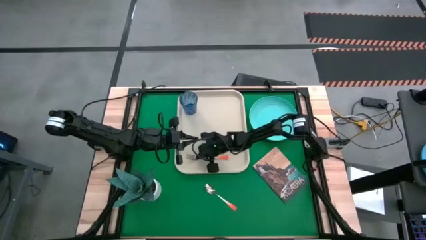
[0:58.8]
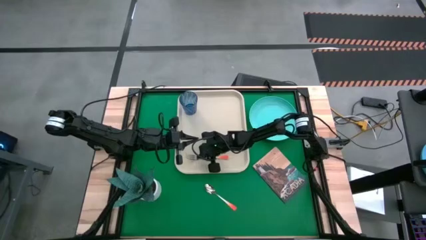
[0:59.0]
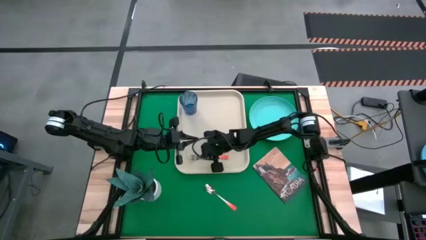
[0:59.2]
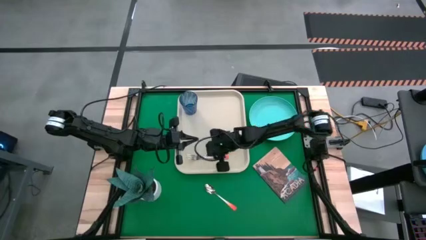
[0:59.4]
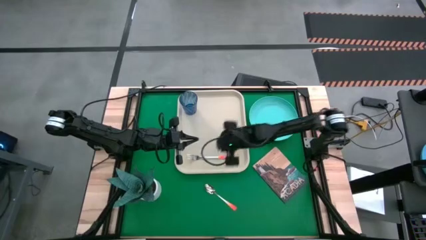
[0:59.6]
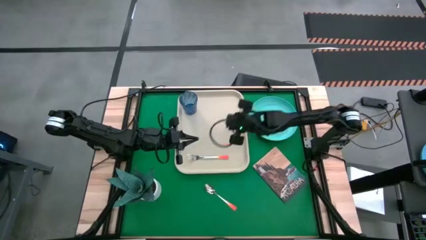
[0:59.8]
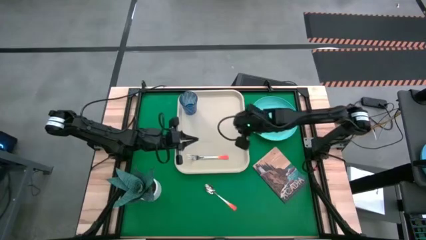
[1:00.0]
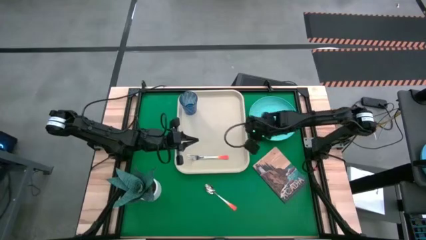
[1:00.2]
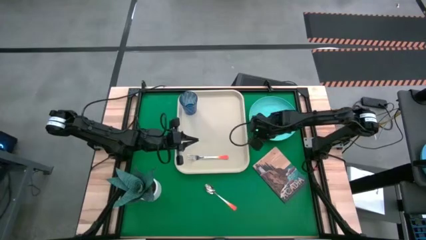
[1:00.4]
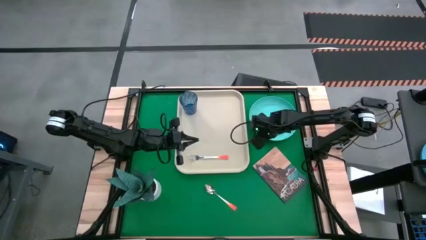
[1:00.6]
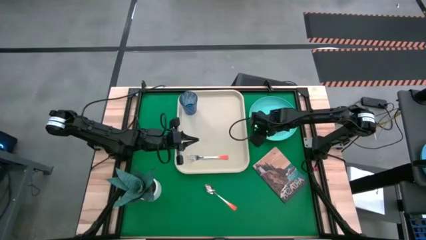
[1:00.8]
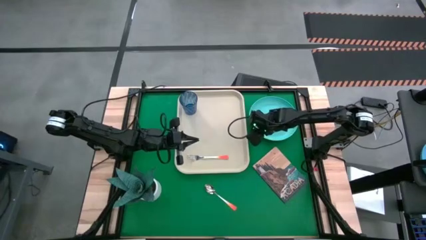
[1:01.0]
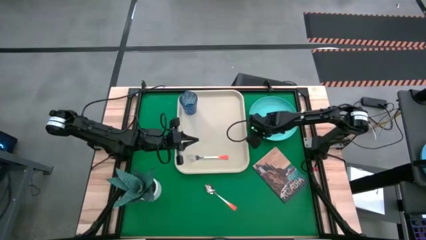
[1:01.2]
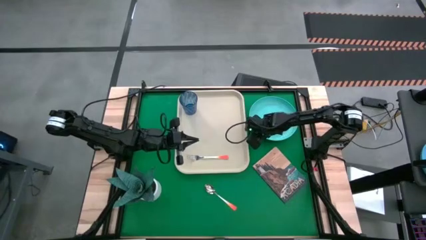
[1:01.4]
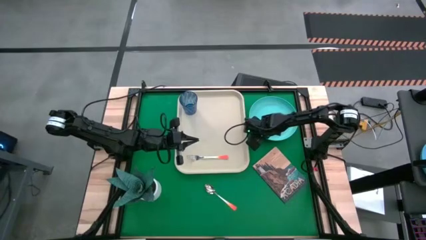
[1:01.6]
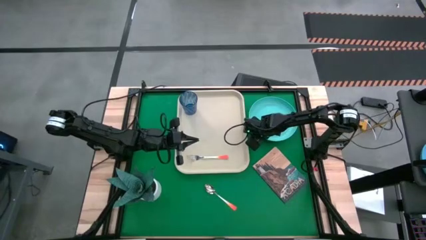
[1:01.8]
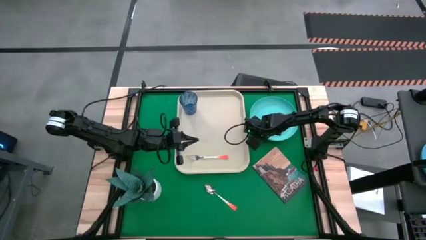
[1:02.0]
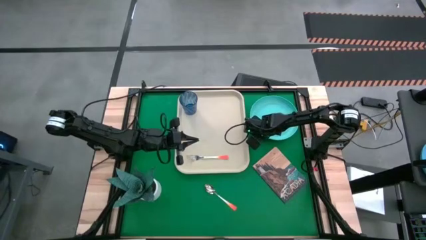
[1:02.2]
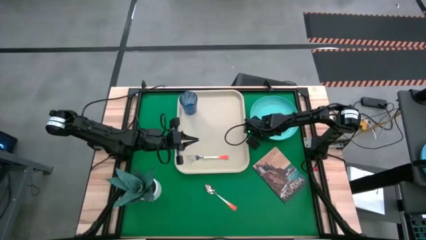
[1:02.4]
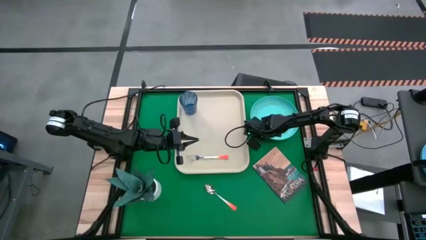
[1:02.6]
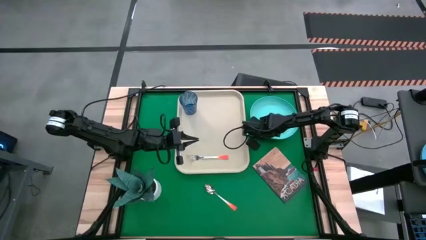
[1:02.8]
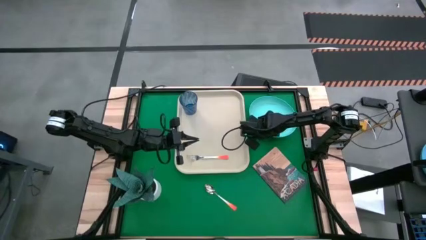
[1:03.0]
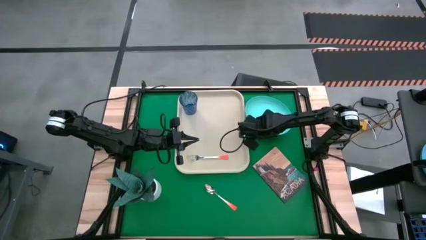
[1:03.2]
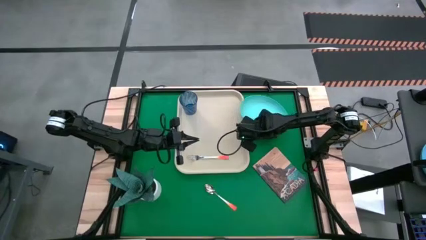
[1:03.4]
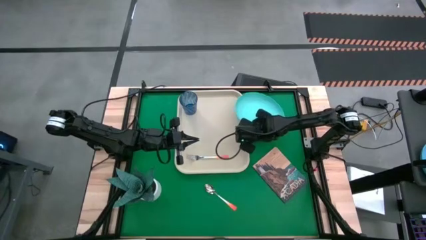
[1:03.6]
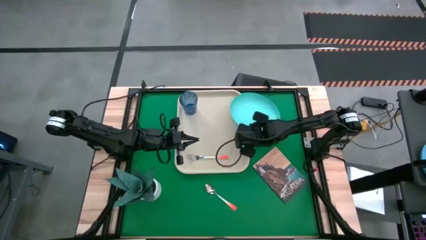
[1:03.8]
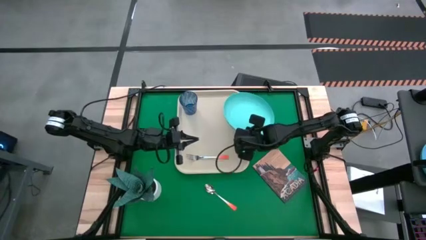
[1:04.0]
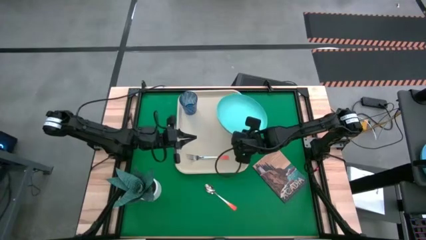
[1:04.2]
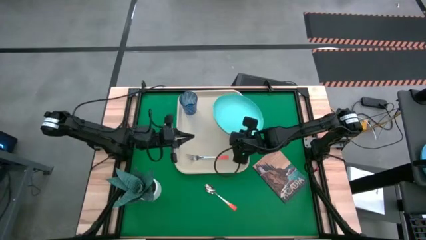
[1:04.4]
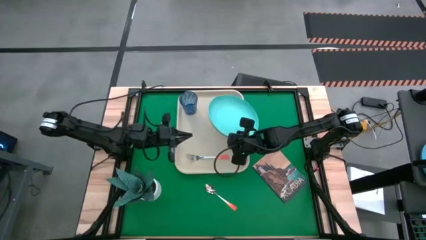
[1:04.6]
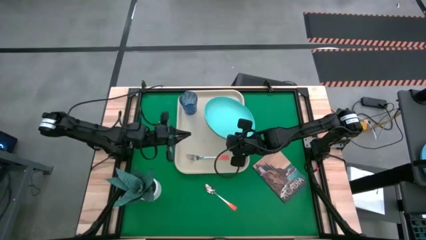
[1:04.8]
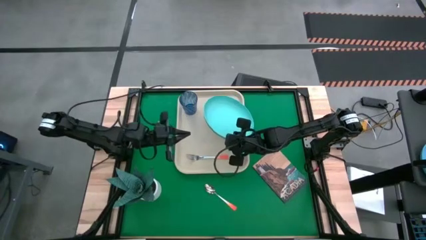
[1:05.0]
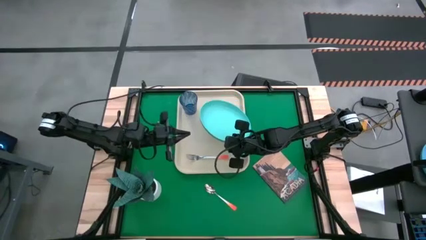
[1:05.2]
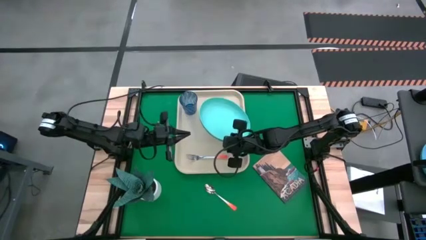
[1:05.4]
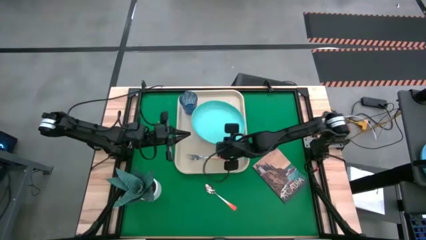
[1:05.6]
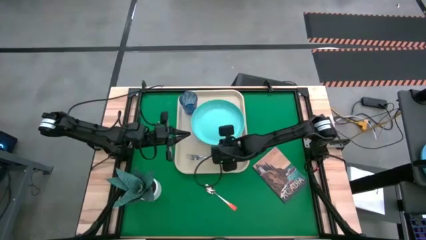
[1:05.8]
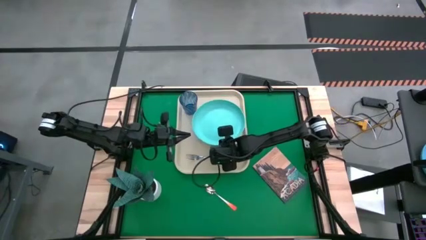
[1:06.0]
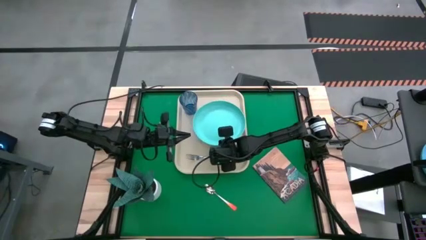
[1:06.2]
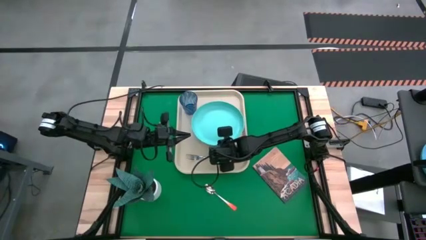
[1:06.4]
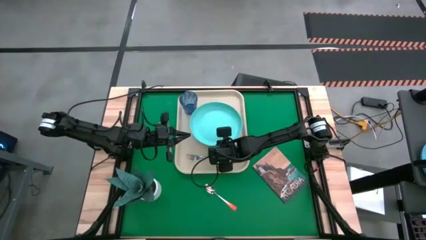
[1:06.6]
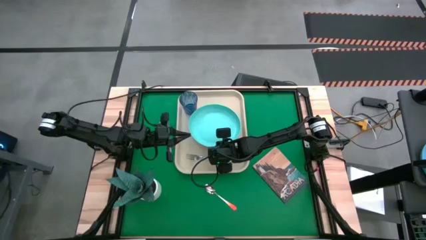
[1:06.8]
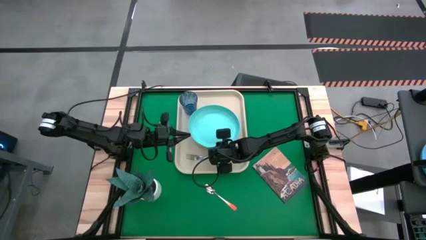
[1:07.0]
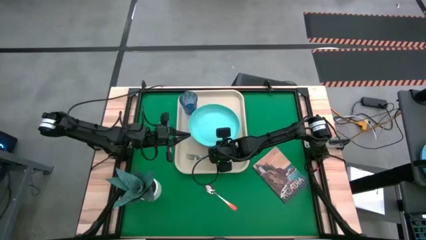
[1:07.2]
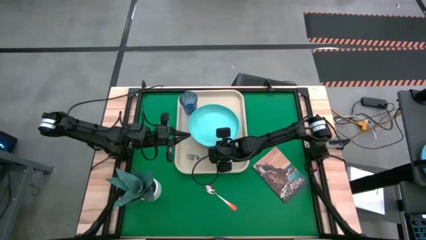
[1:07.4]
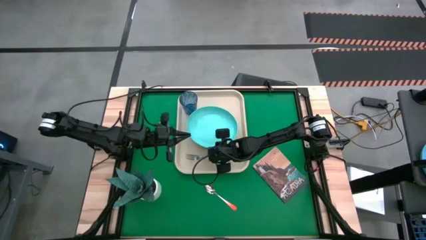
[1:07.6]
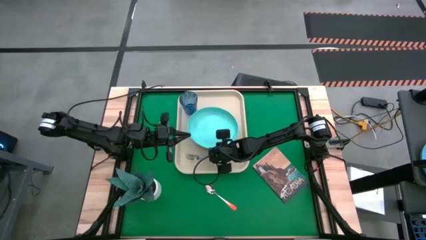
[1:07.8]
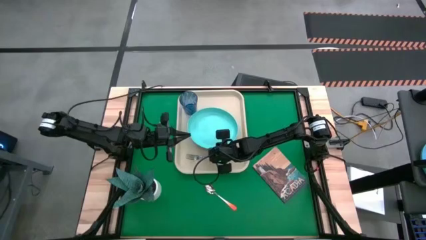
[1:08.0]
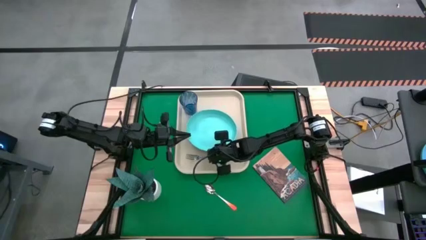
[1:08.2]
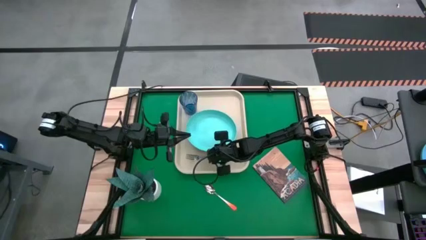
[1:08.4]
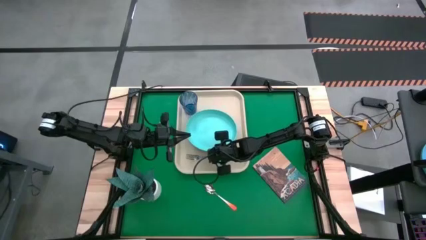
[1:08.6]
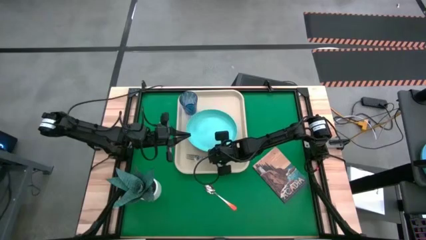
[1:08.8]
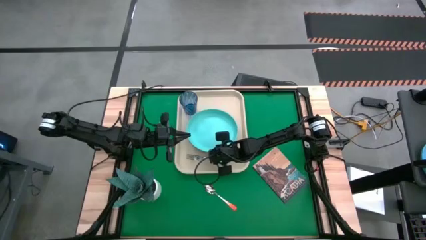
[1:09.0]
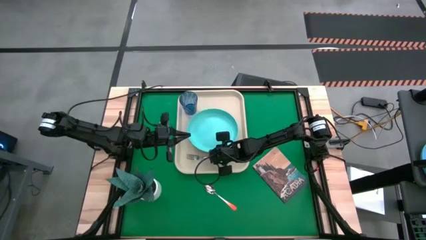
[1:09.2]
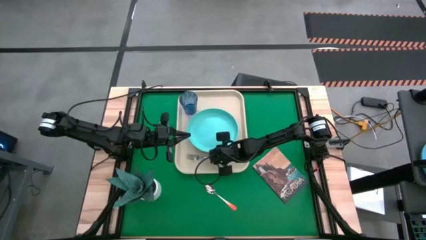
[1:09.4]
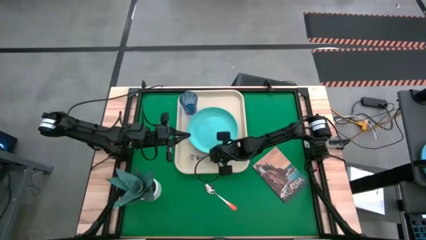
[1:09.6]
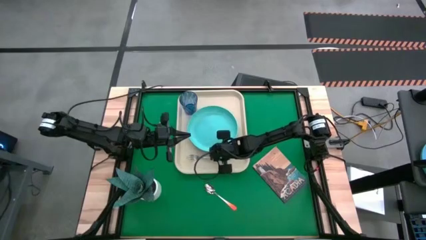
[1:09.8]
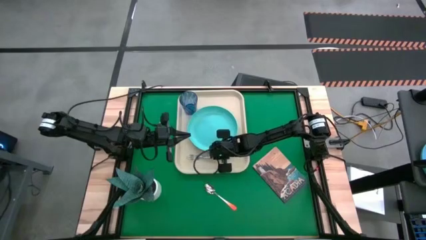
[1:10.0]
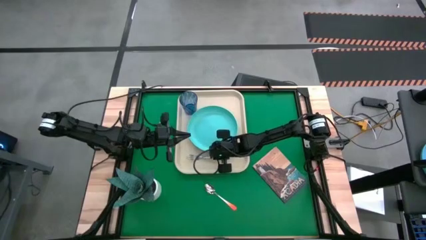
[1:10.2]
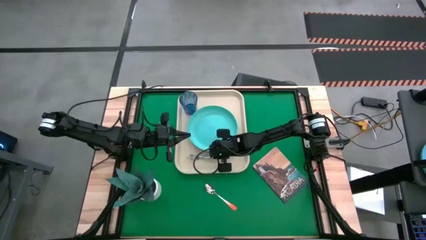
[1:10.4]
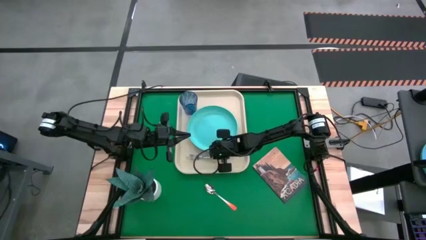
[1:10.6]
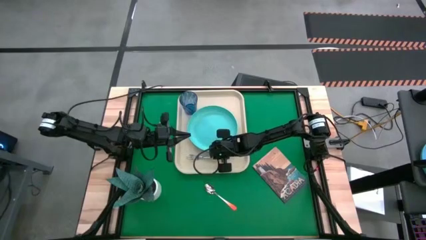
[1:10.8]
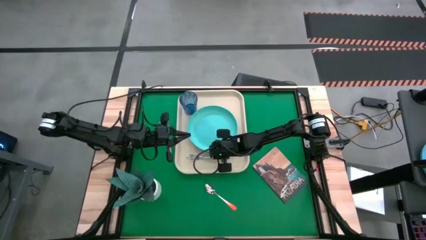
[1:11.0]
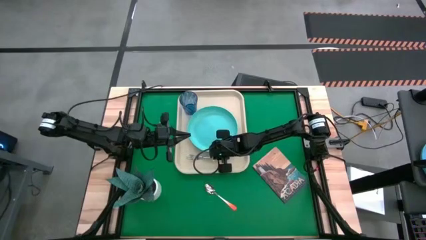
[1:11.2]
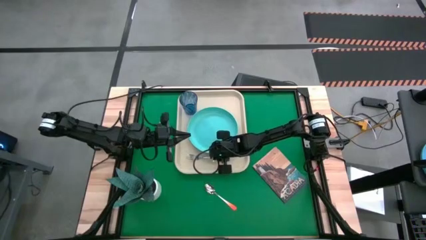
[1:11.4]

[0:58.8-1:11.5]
Task: Pick and place plate/cup/fork/spoon on tray
Put the blue plate on the serving tray
